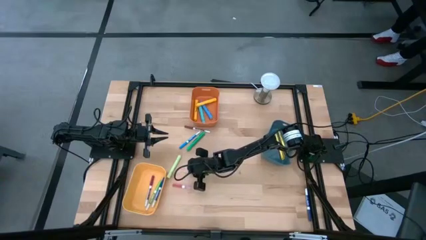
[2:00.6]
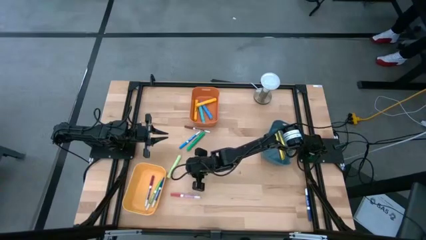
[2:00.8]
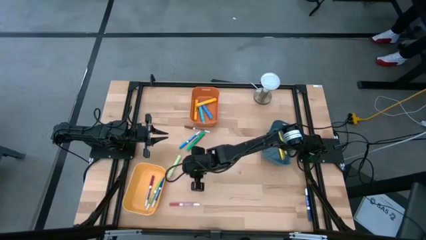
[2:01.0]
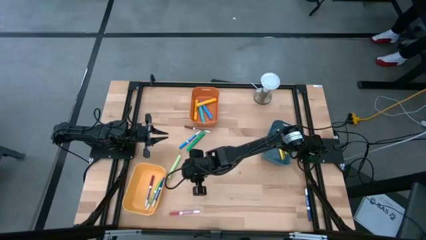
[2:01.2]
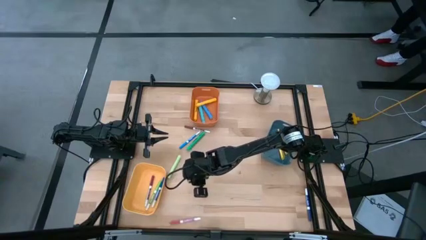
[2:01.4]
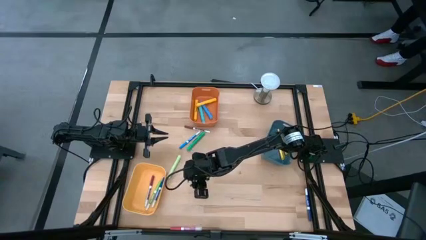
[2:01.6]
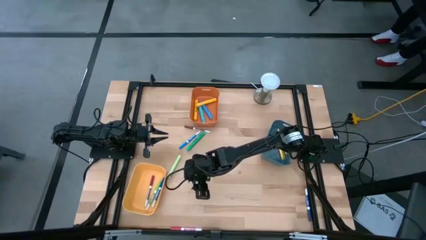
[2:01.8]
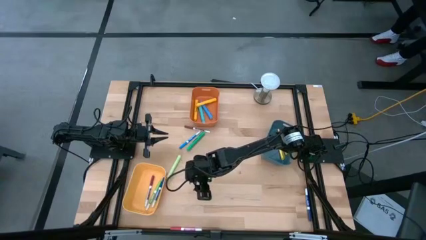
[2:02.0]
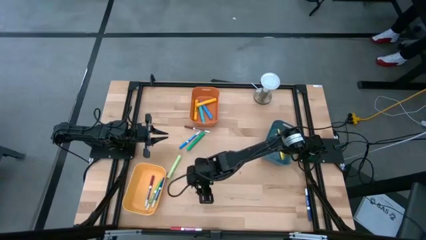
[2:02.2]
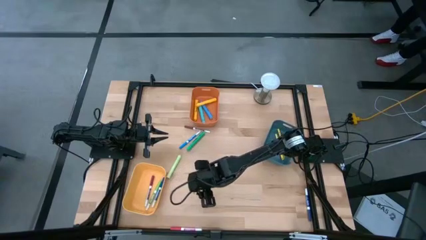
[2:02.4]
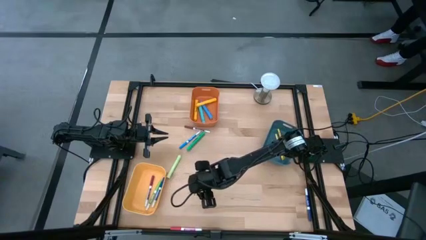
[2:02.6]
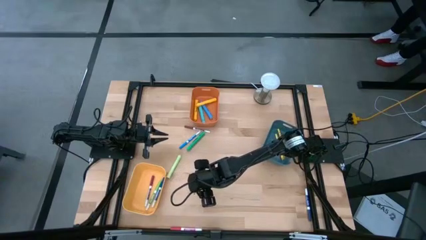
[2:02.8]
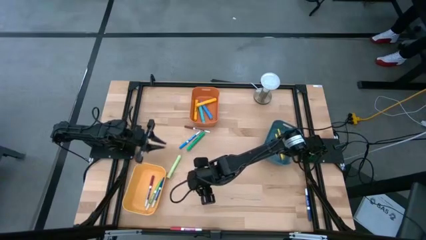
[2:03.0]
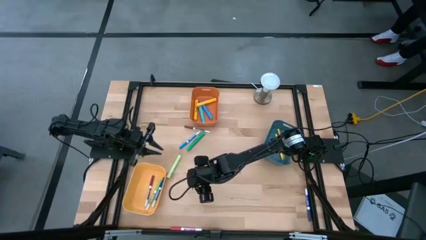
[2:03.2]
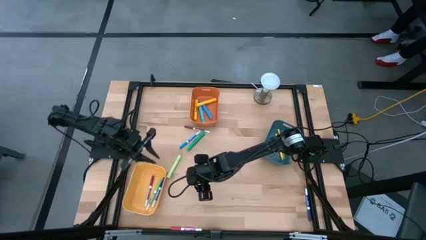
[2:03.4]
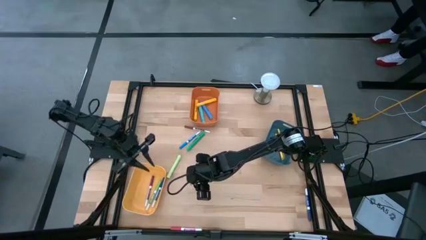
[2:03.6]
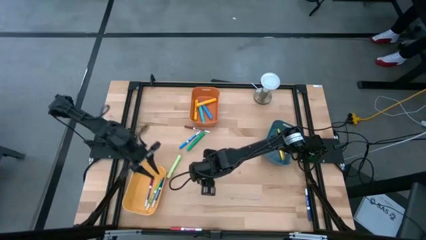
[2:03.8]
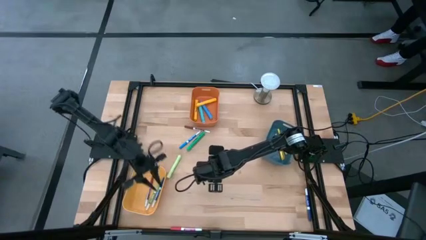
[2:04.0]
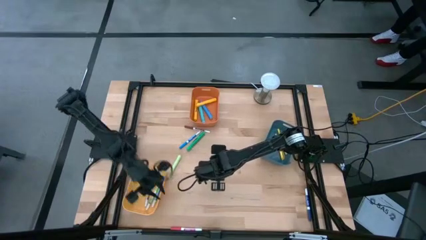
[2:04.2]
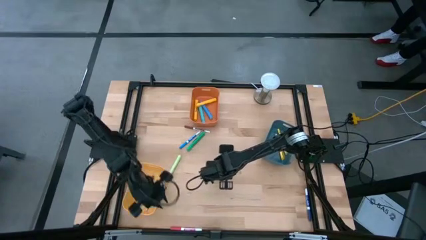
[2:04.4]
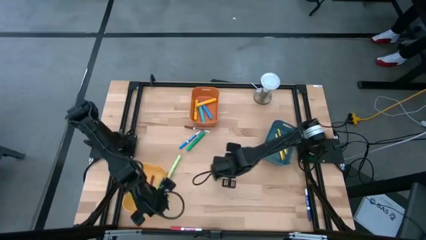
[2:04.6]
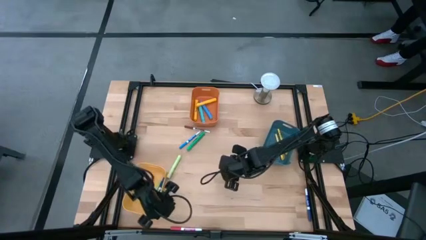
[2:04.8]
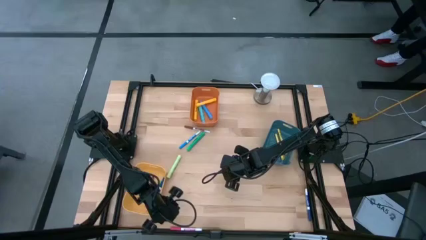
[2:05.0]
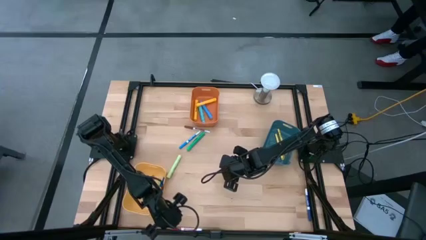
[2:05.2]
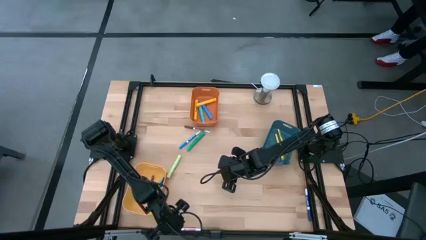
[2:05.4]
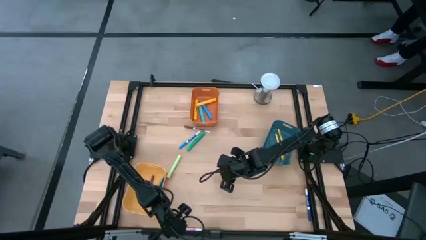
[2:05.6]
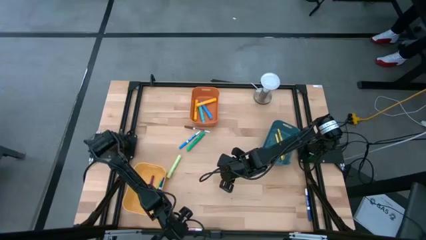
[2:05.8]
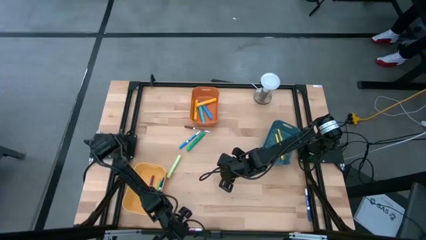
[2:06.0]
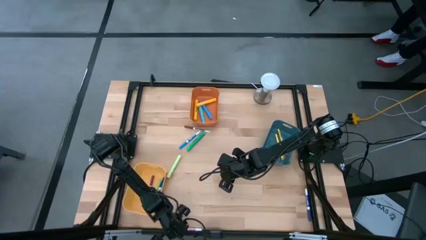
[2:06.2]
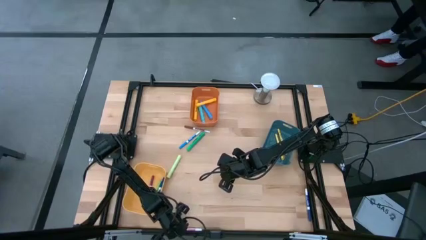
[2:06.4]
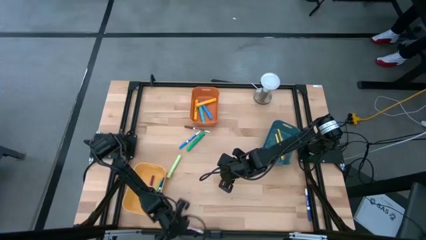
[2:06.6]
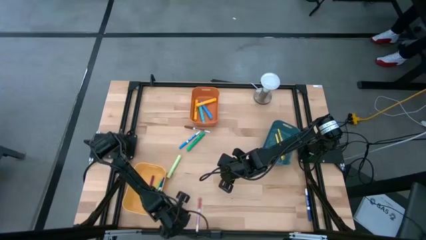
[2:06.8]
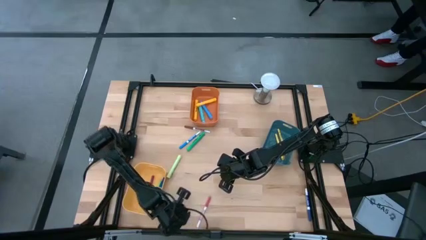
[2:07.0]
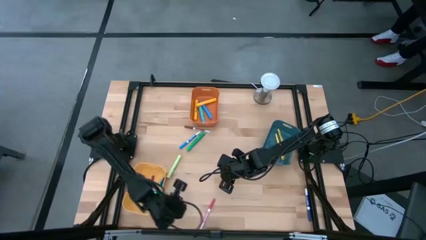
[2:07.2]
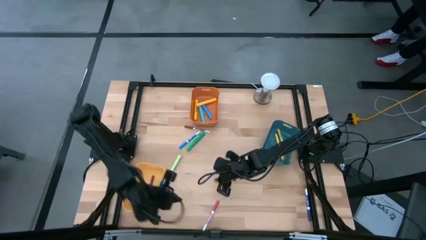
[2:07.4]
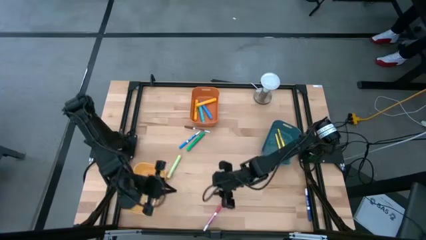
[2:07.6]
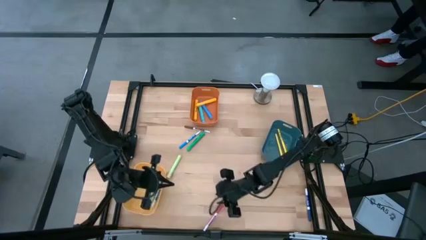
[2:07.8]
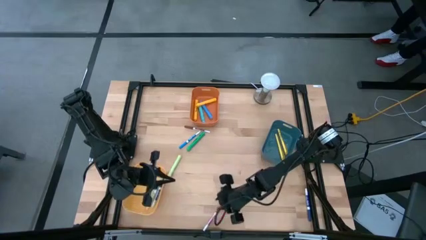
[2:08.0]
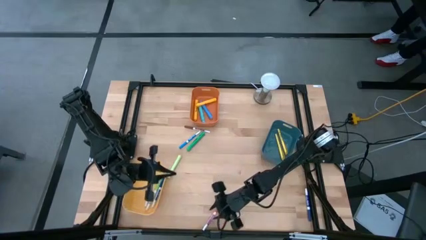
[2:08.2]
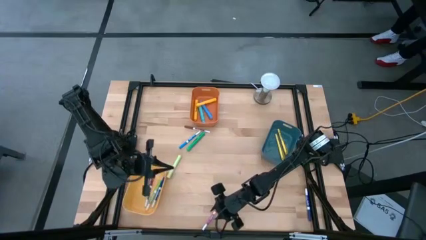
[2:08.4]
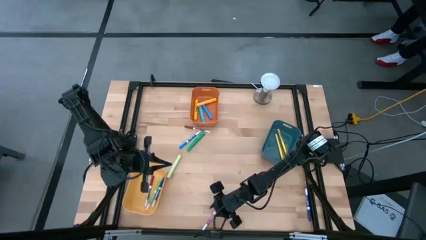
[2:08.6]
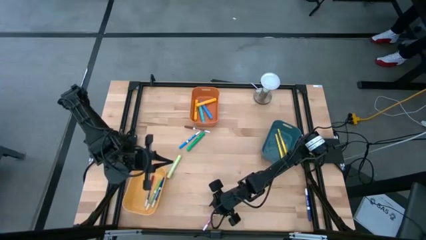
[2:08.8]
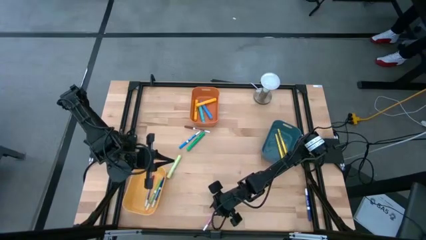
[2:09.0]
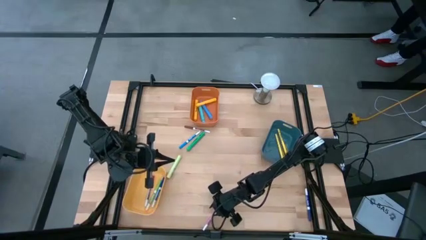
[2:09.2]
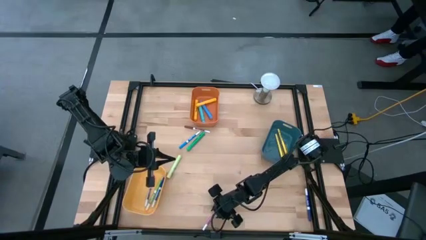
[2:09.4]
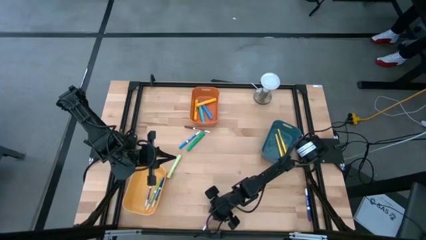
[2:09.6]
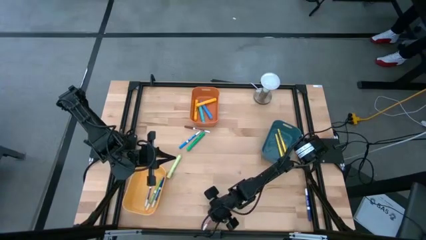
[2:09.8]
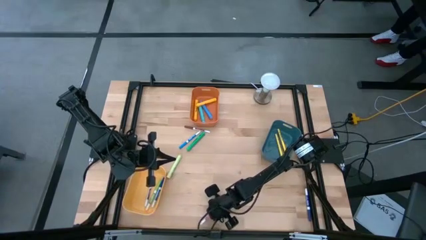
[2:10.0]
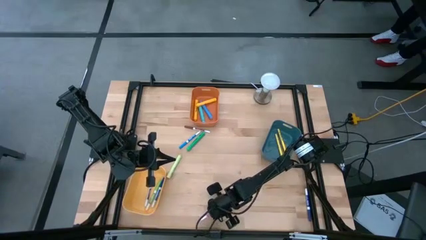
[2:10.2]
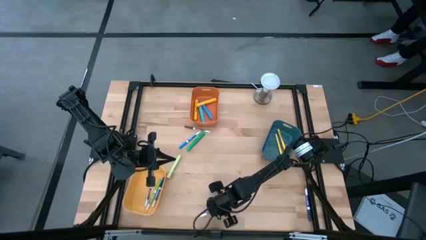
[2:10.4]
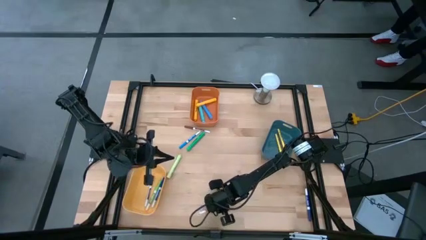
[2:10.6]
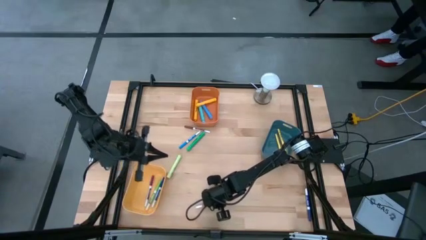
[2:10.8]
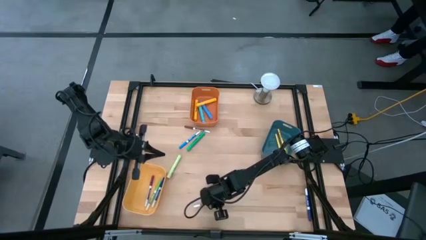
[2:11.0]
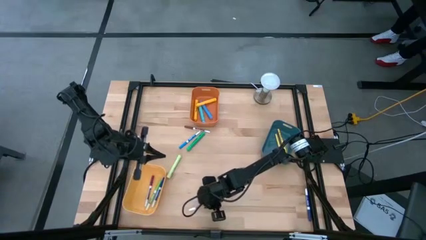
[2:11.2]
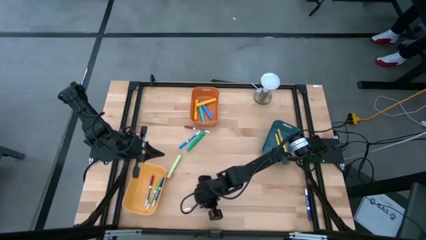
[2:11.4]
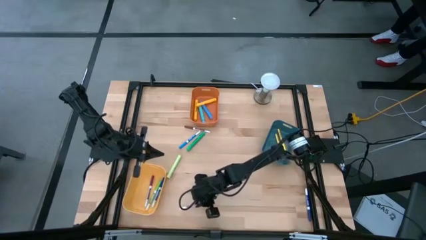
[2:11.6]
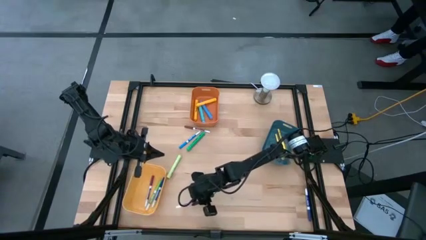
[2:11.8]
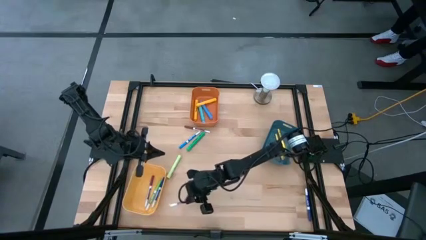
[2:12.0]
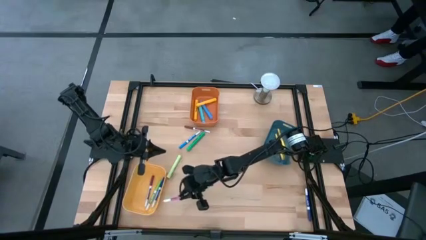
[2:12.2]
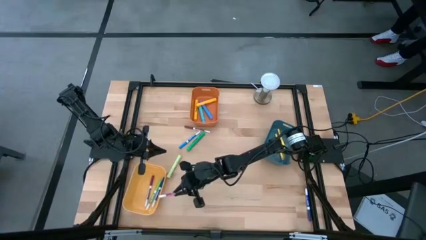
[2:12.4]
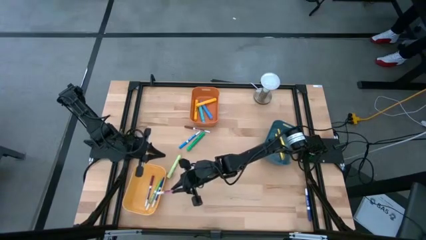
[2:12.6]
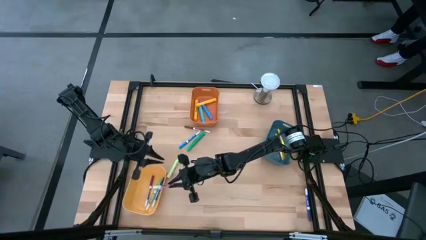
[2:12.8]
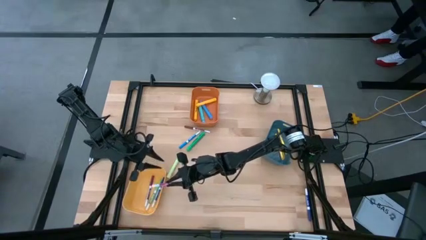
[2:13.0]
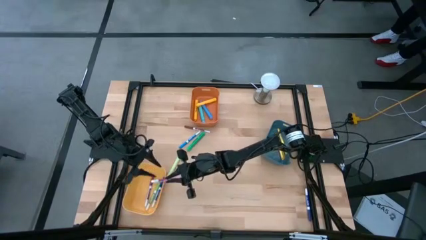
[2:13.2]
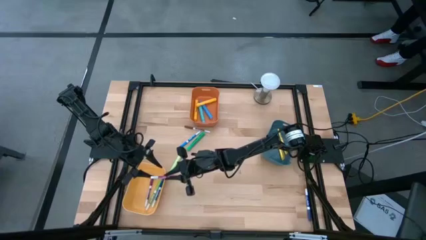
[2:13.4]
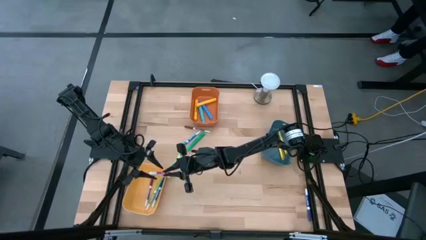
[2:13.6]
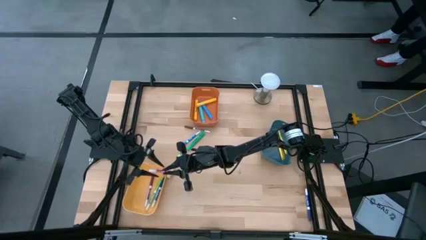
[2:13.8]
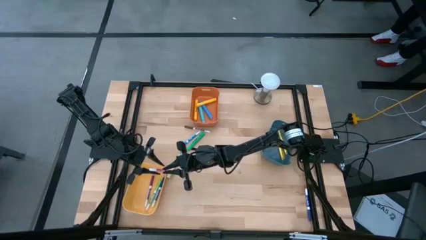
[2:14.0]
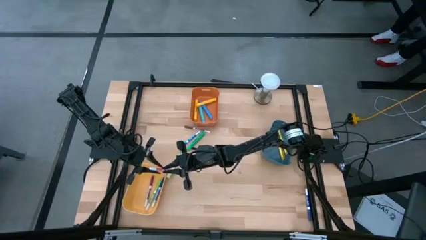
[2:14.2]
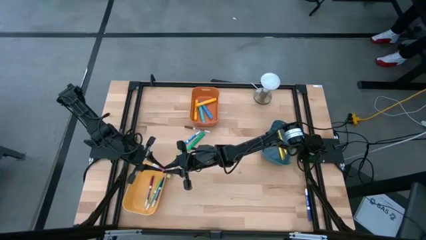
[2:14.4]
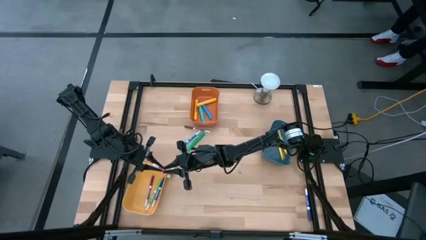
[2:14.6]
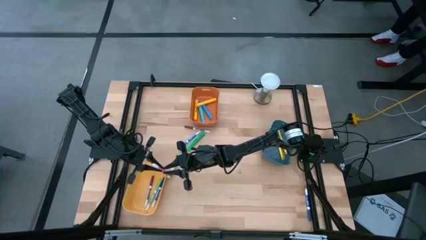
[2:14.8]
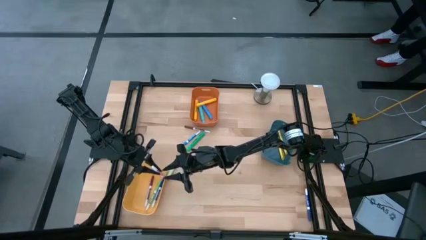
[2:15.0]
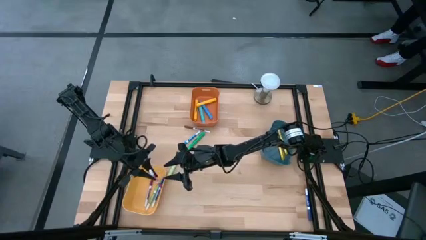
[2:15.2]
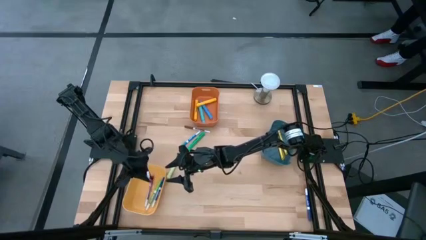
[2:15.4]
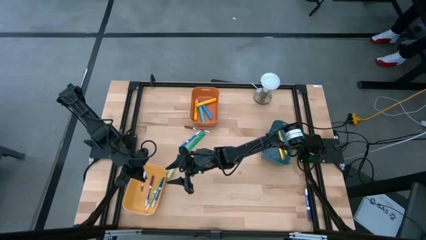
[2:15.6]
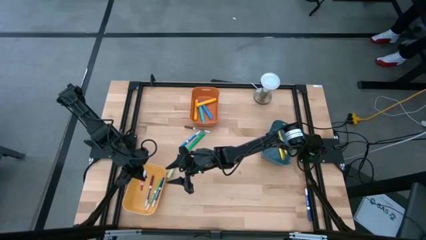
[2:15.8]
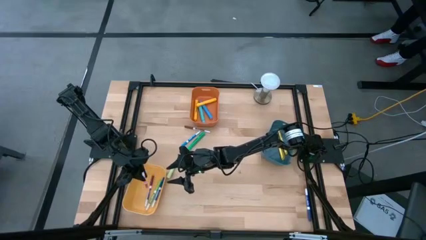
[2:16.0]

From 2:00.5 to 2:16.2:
Task: Pick & Place Markers
Put the pink marker pen into the yellow bin
